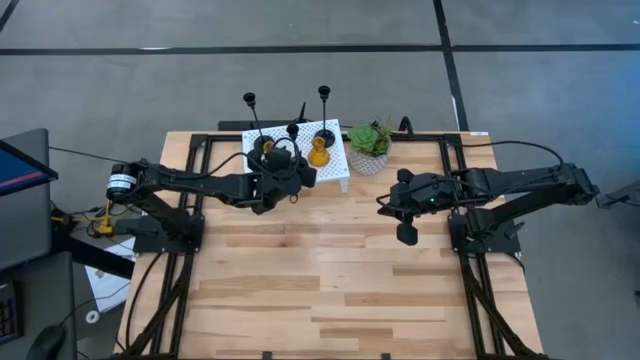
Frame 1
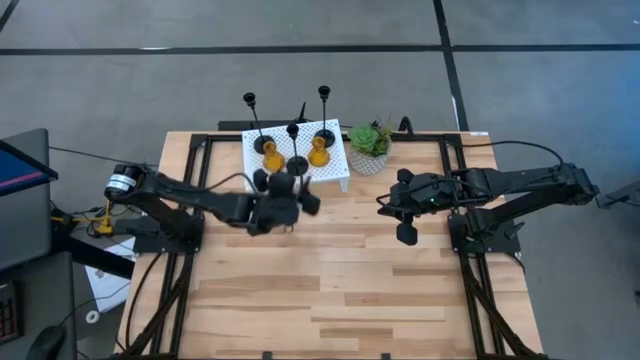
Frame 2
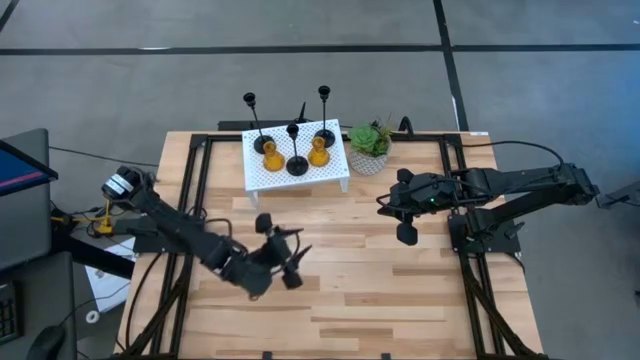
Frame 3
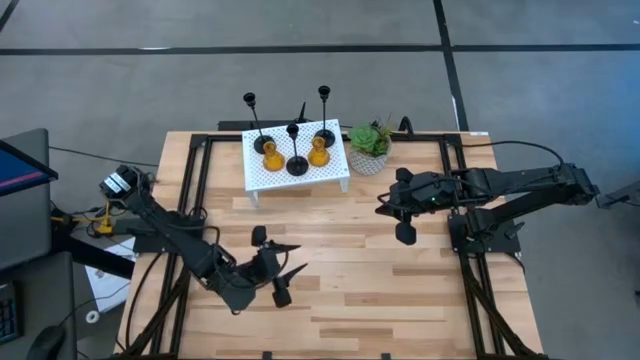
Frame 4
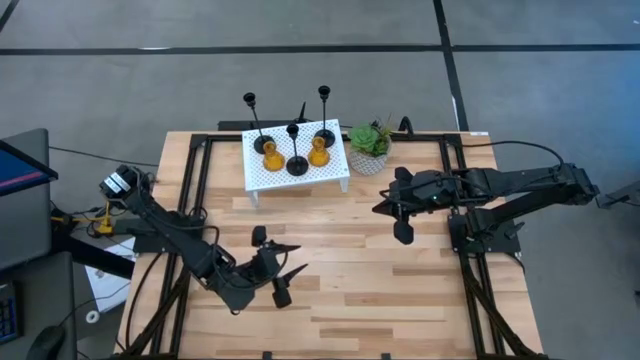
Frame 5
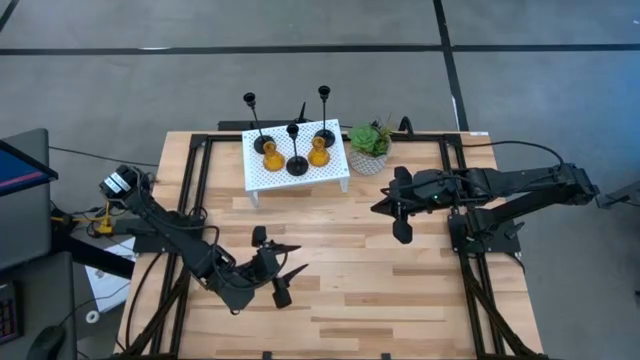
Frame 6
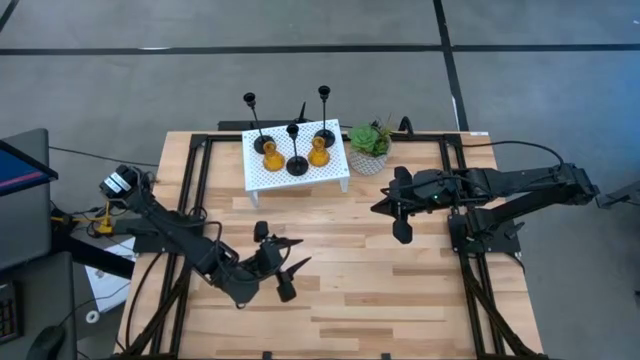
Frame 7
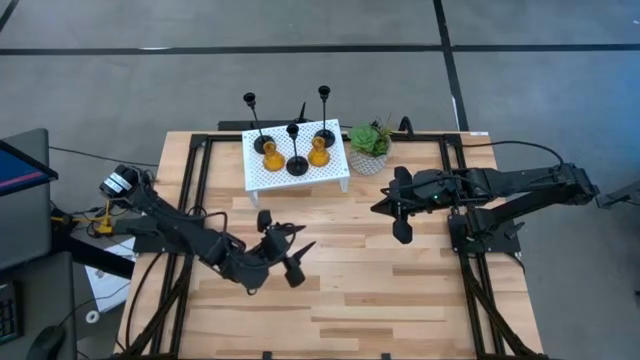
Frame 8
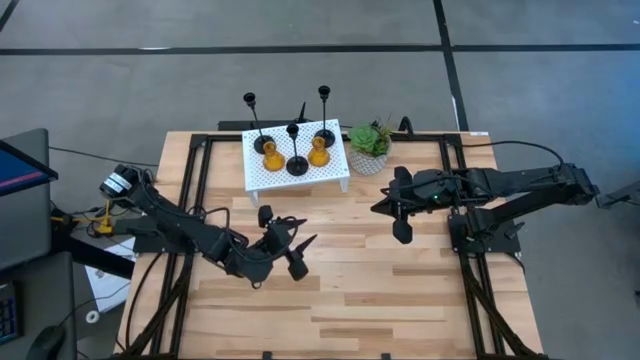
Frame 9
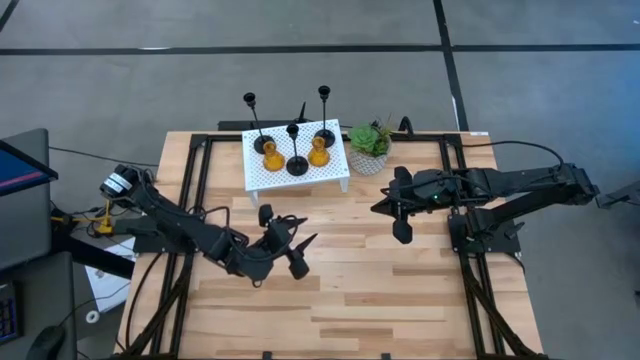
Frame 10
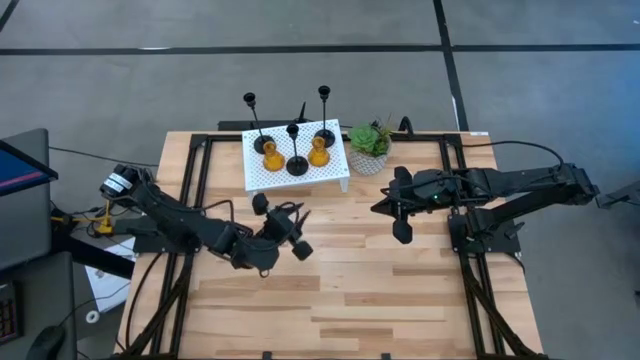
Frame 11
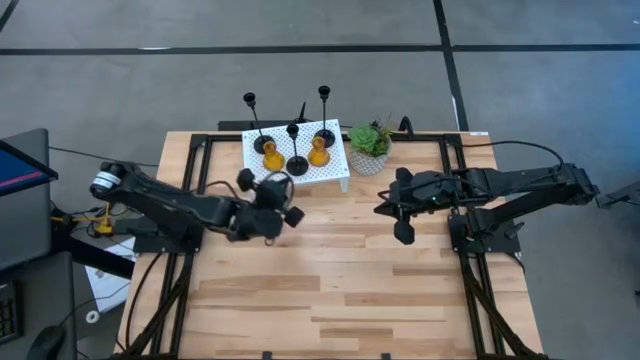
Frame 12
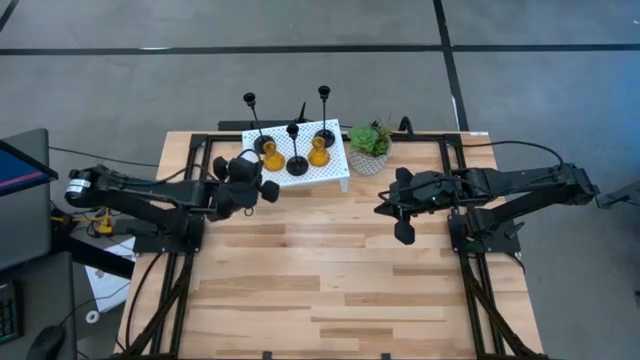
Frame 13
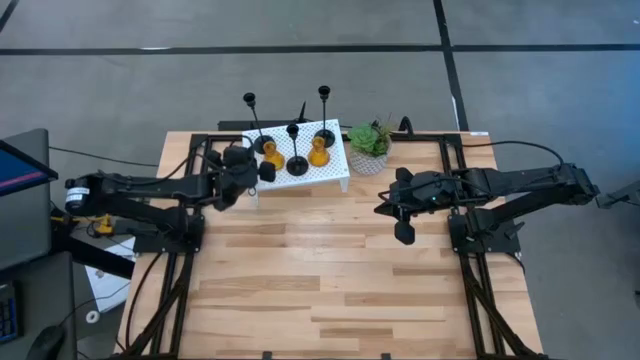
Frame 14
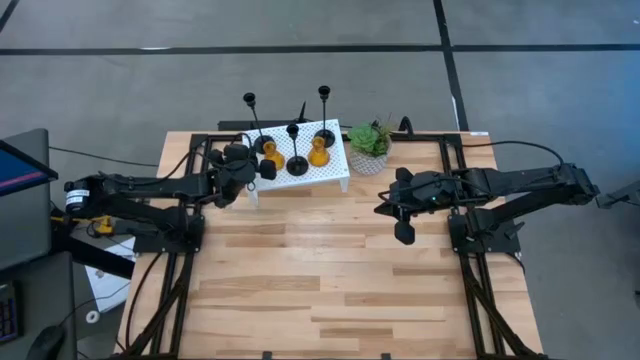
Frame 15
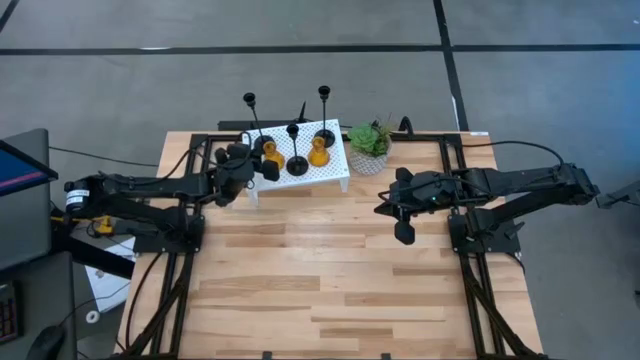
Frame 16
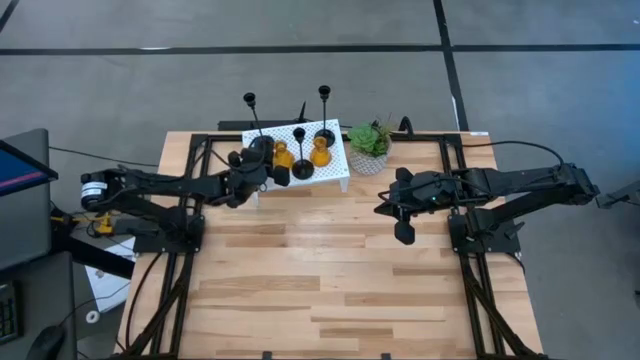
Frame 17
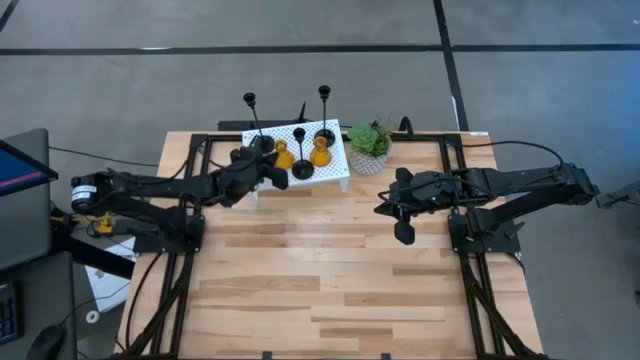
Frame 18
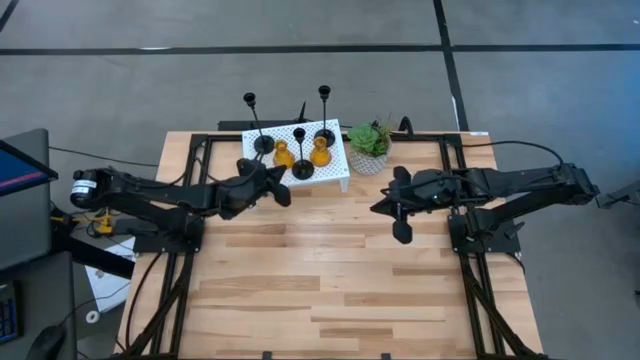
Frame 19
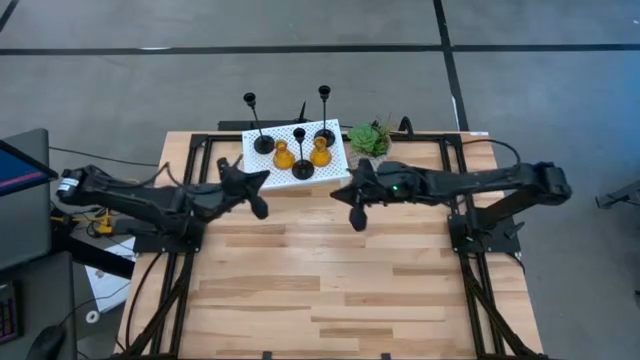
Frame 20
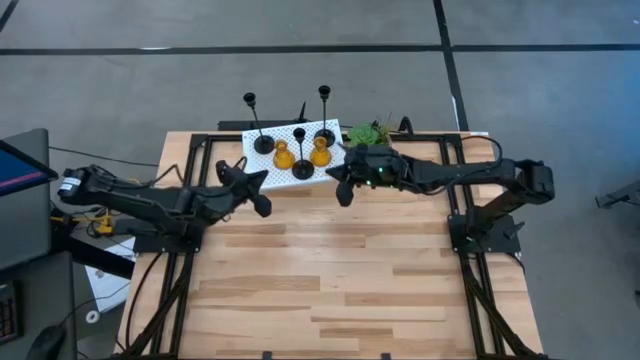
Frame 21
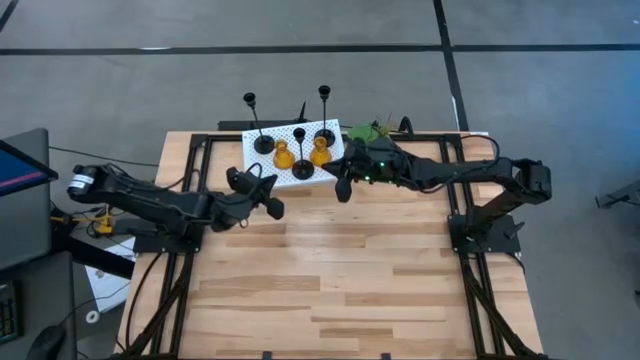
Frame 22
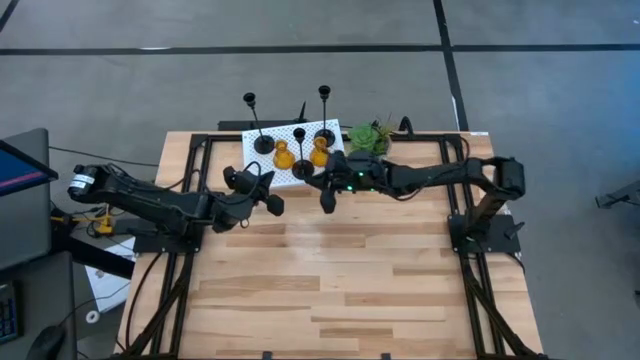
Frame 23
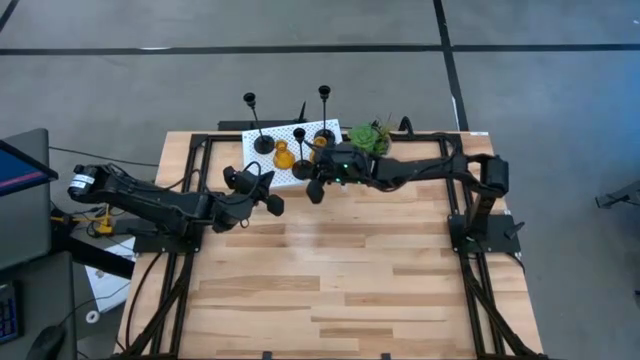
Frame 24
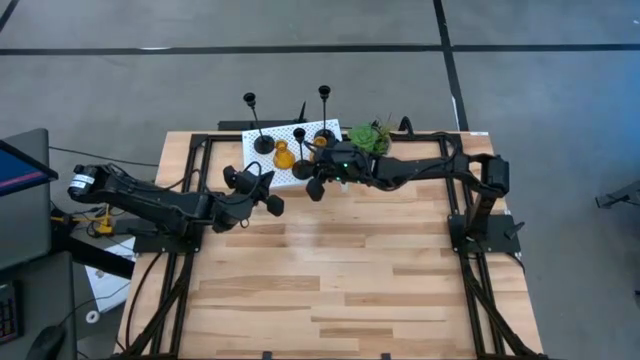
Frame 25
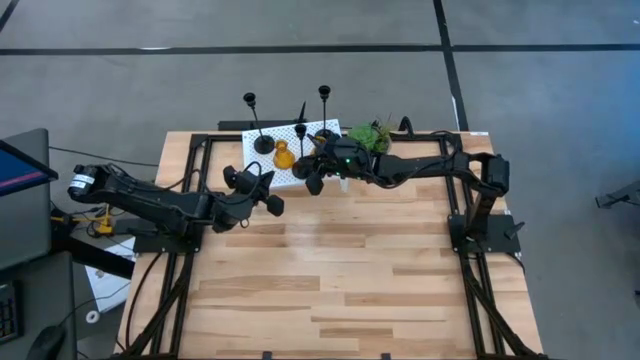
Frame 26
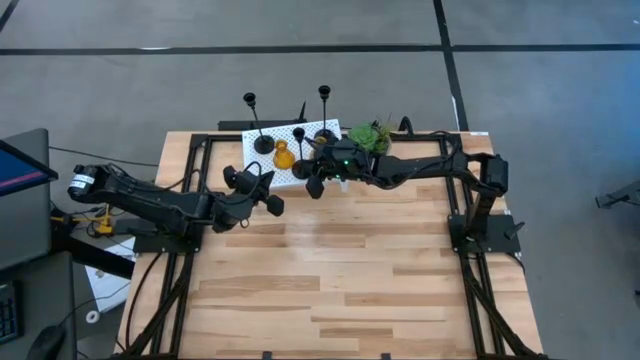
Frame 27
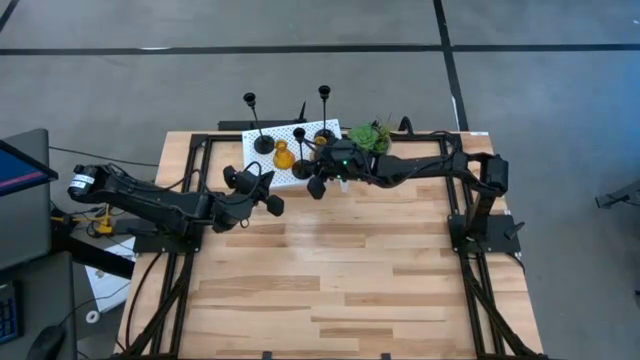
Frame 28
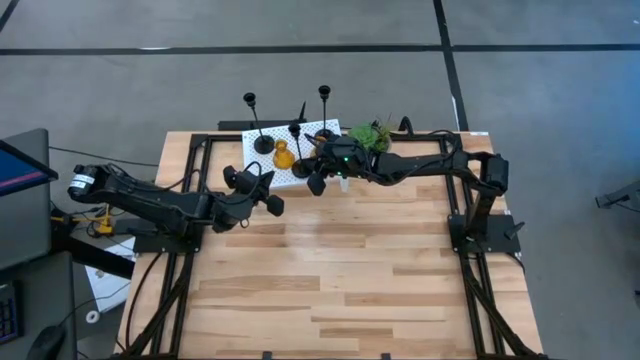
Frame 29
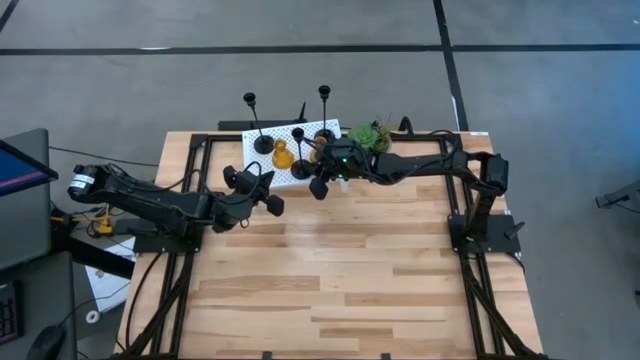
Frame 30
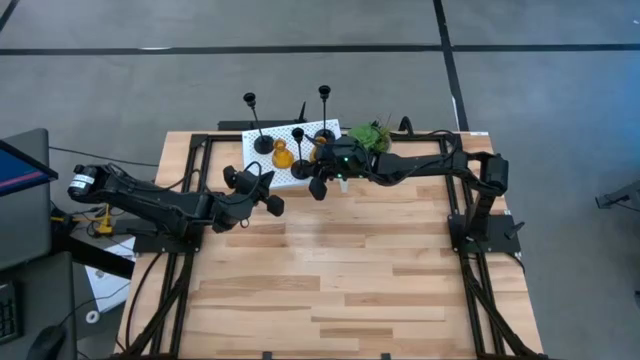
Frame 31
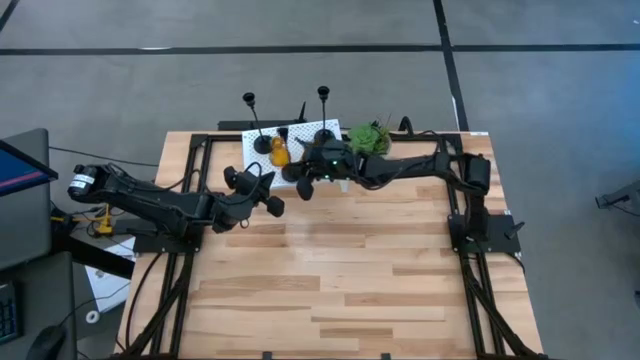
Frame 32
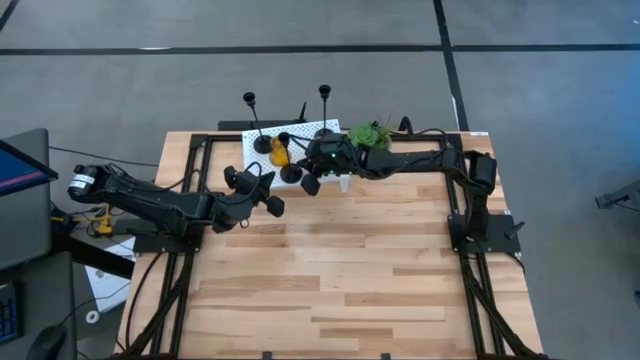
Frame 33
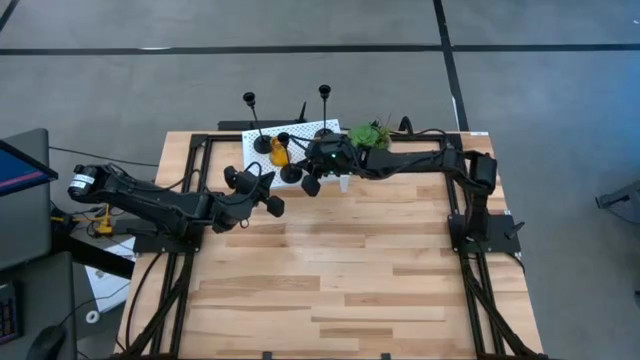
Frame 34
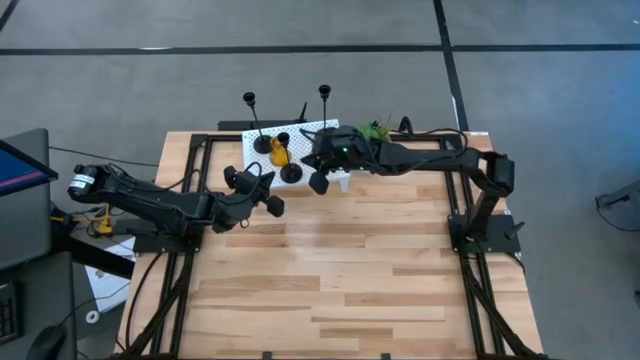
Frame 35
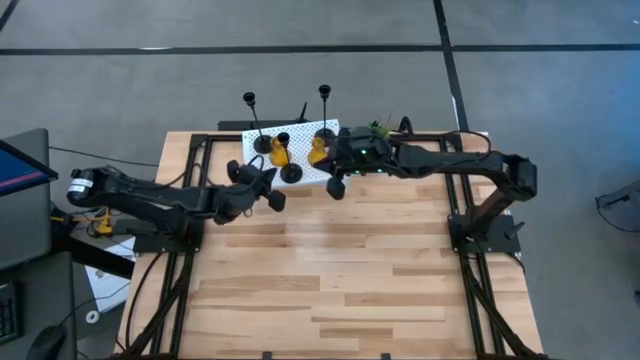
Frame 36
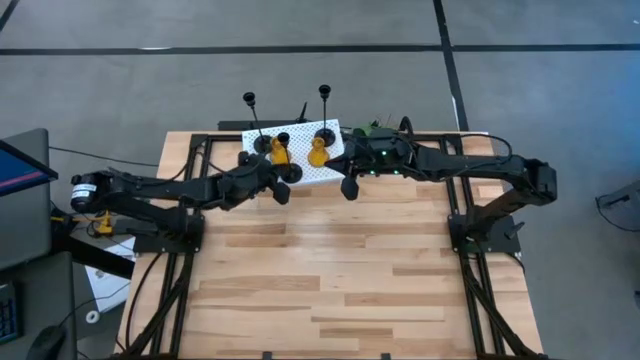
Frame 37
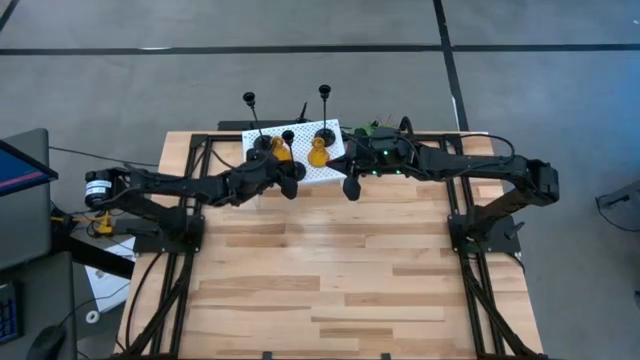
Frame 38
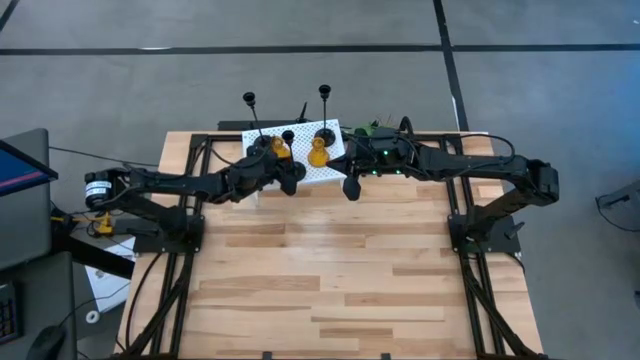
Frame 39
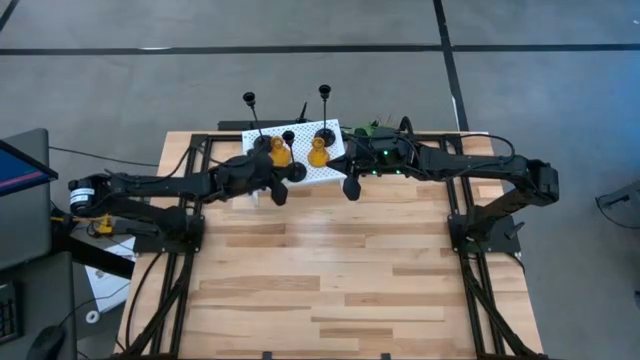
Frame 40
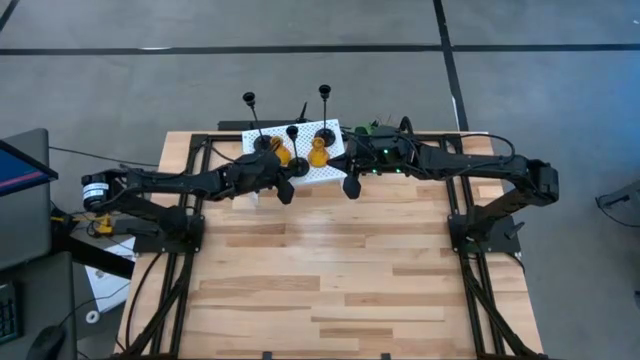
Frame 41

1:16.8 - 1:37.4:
Task: Pick & Place candle stick holders
Adjust the candle holders on the shelf

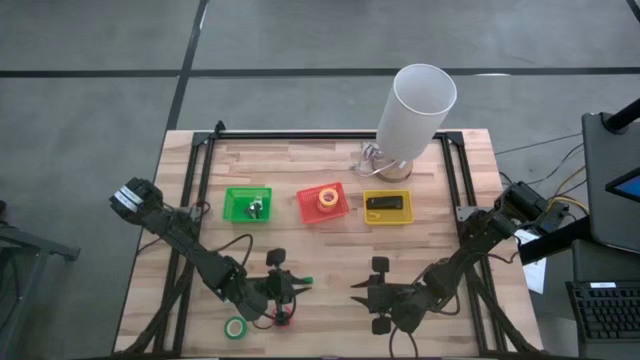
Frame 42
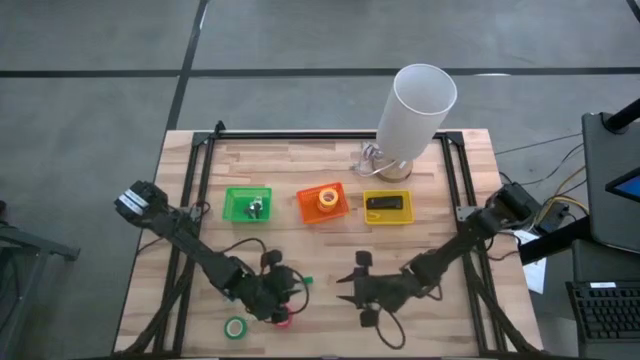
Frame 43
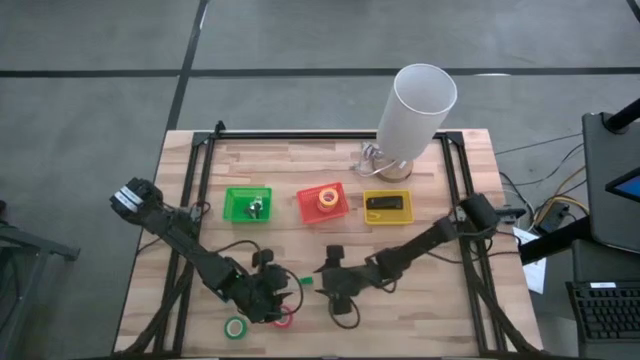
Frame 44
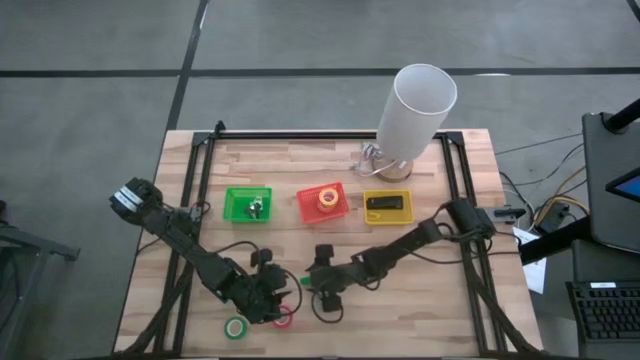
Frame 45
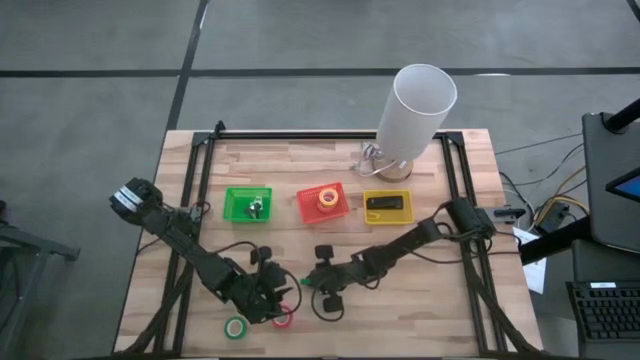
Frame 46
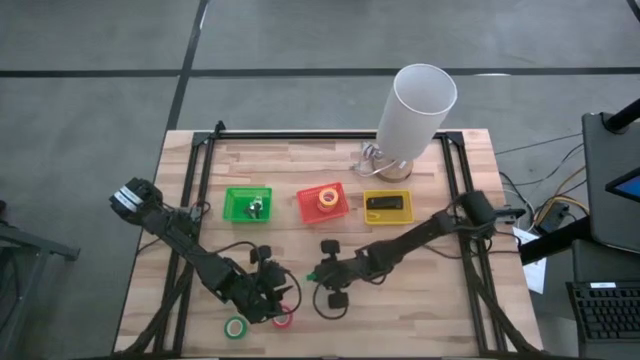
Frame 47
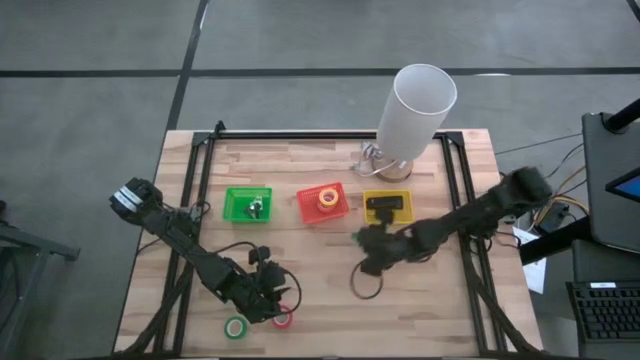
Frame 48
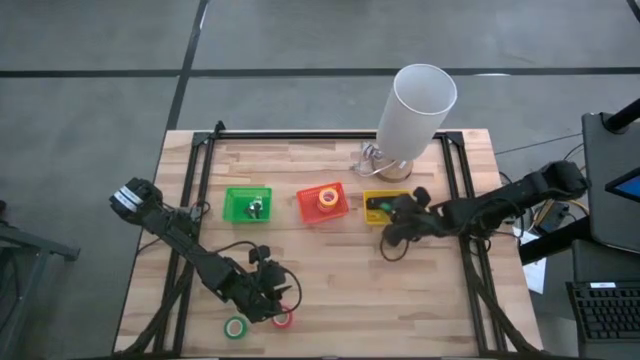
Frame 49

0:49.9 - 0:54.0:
Task: Pick and place Stapler, Stapler remover, tape
Put the green stapler into the yellow basket
